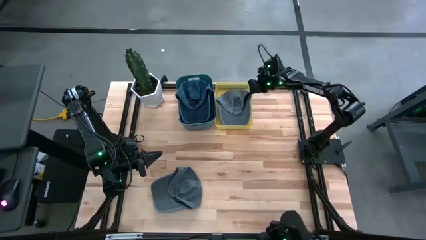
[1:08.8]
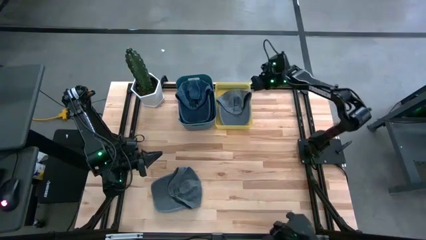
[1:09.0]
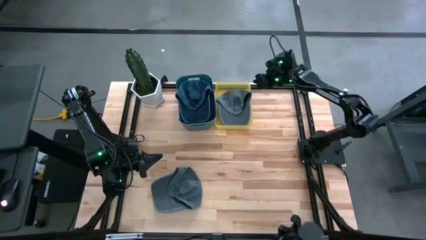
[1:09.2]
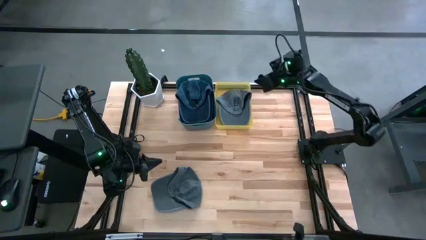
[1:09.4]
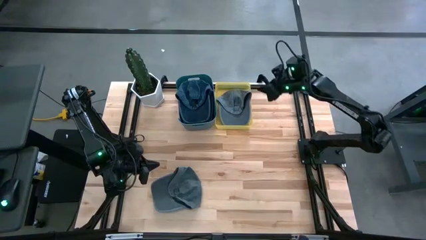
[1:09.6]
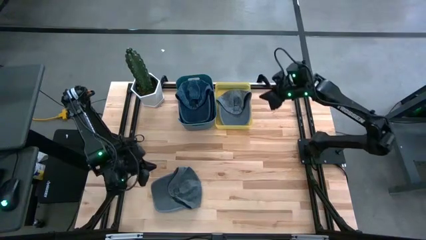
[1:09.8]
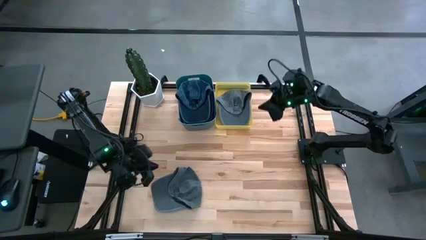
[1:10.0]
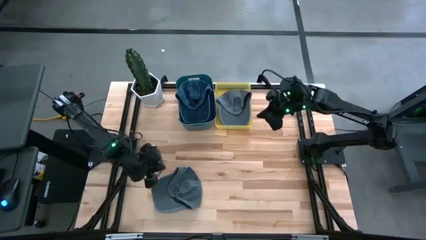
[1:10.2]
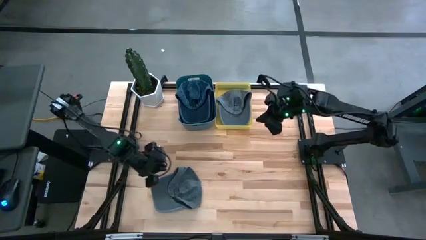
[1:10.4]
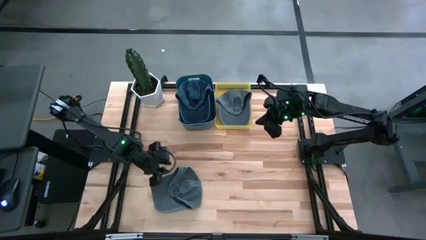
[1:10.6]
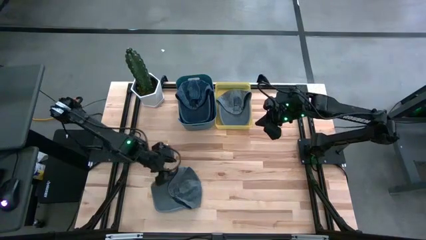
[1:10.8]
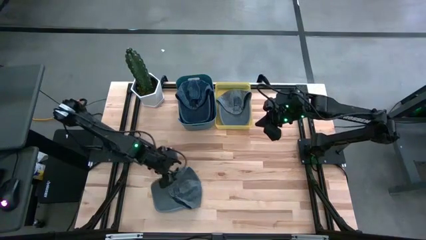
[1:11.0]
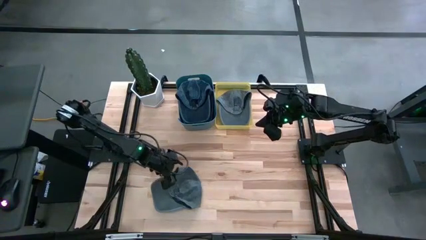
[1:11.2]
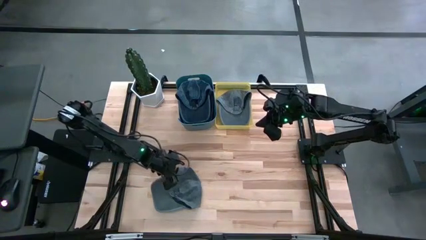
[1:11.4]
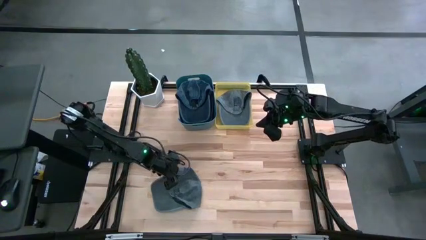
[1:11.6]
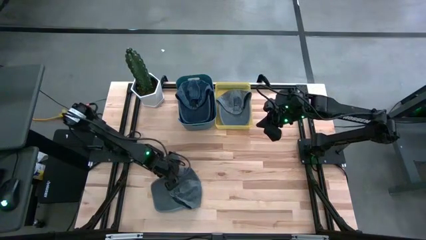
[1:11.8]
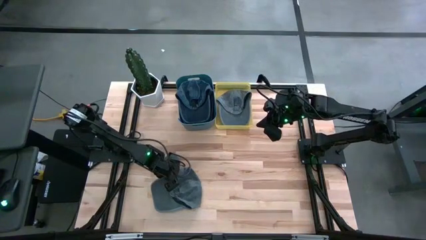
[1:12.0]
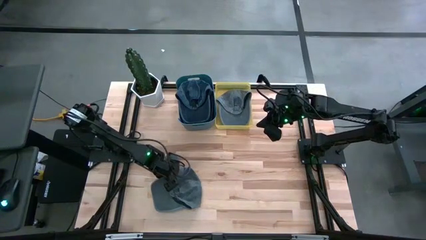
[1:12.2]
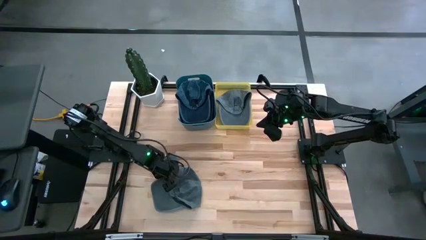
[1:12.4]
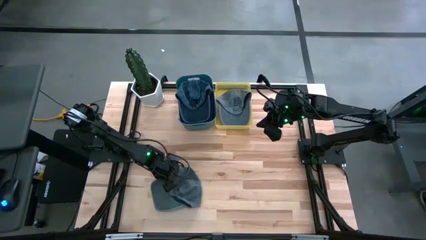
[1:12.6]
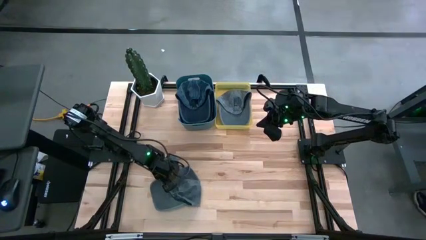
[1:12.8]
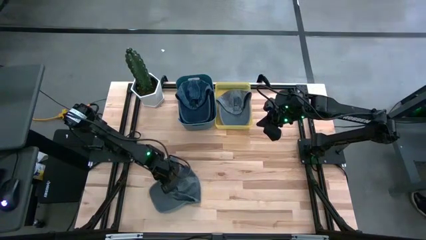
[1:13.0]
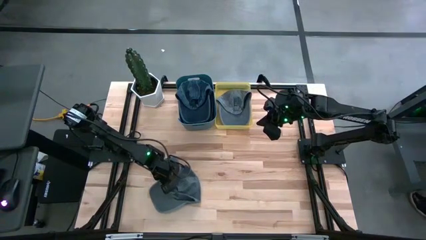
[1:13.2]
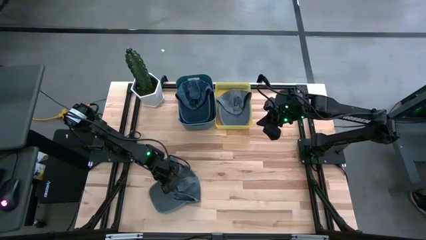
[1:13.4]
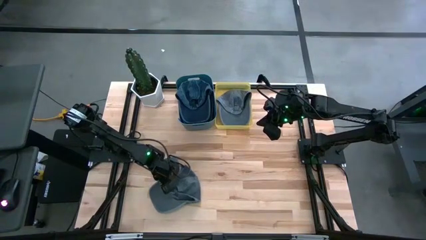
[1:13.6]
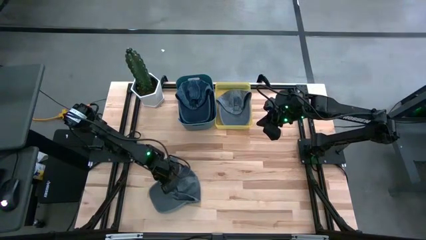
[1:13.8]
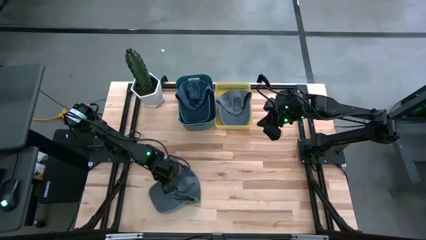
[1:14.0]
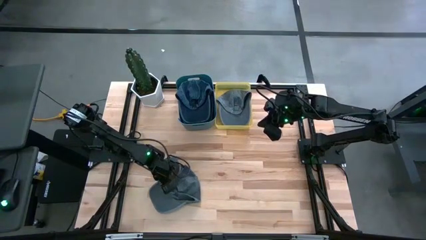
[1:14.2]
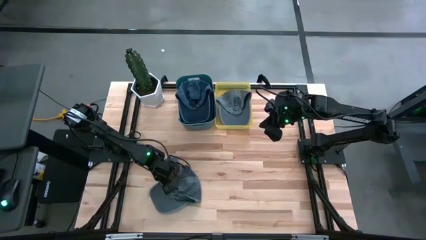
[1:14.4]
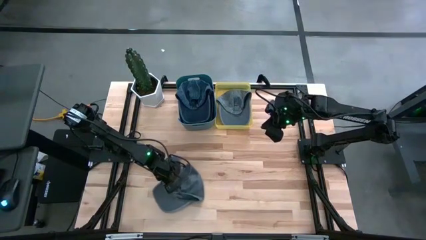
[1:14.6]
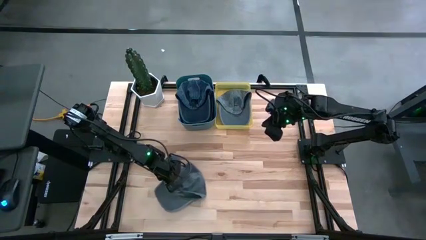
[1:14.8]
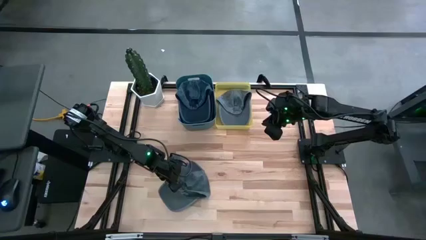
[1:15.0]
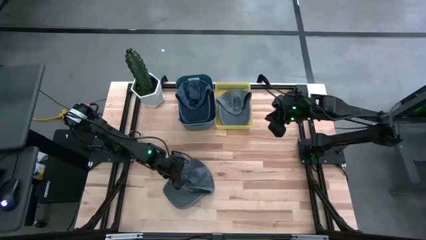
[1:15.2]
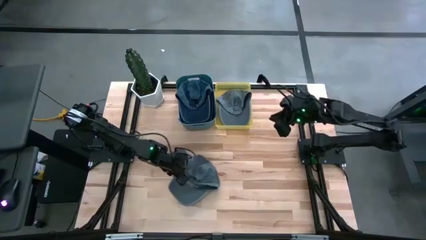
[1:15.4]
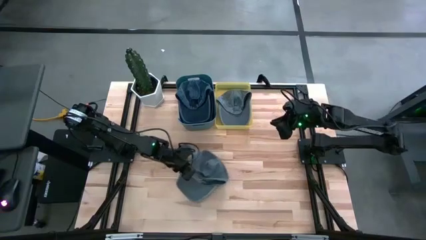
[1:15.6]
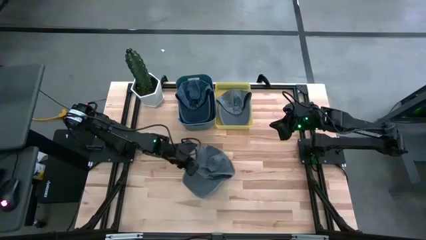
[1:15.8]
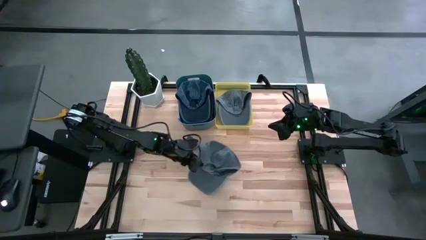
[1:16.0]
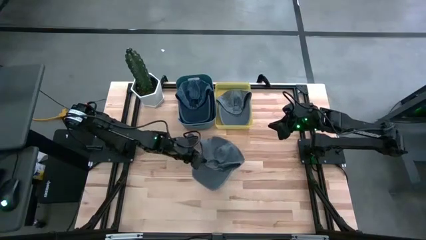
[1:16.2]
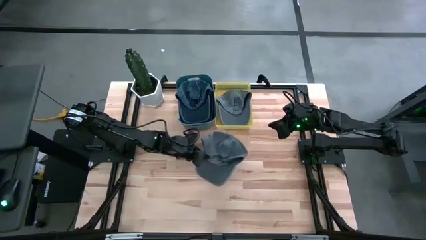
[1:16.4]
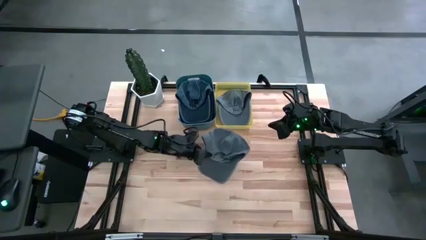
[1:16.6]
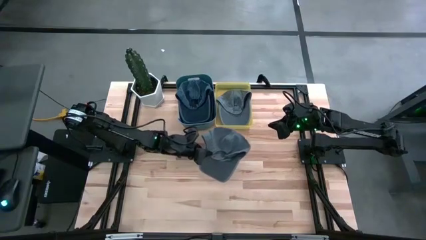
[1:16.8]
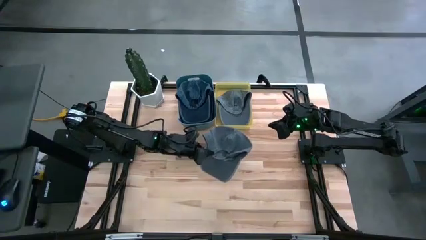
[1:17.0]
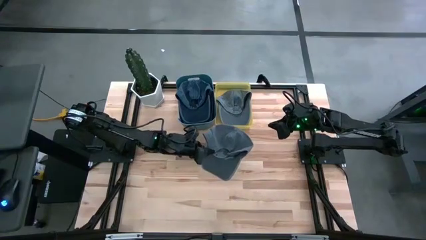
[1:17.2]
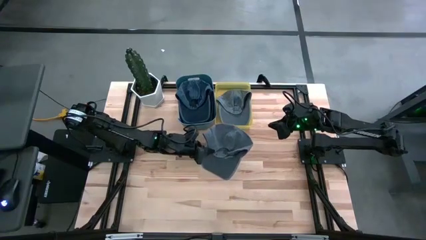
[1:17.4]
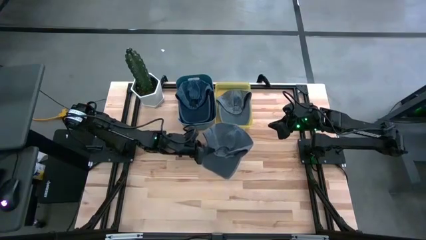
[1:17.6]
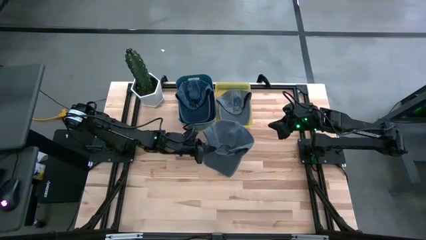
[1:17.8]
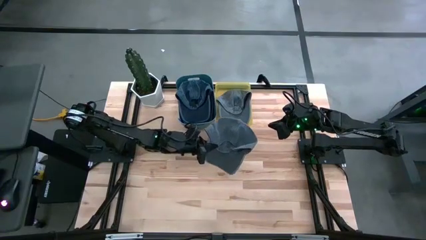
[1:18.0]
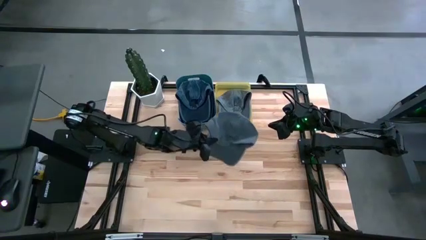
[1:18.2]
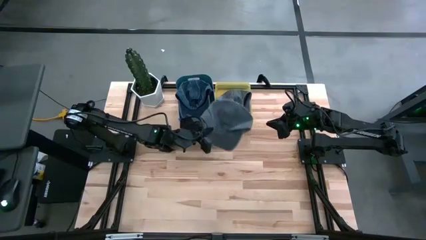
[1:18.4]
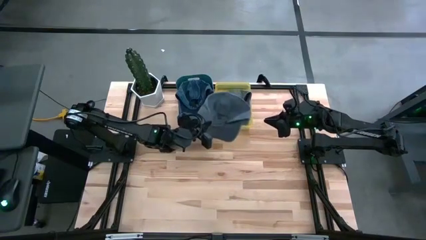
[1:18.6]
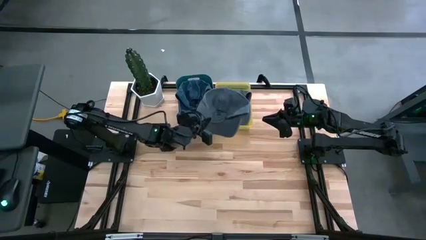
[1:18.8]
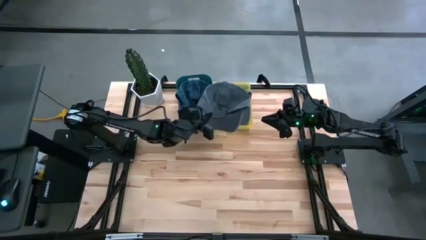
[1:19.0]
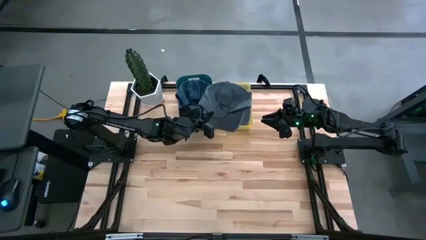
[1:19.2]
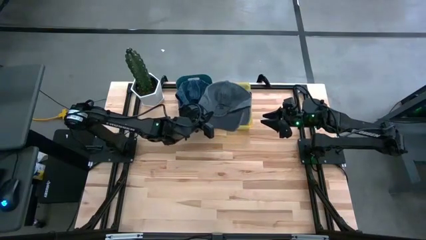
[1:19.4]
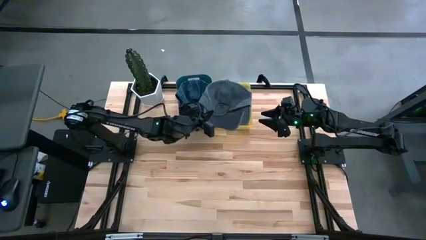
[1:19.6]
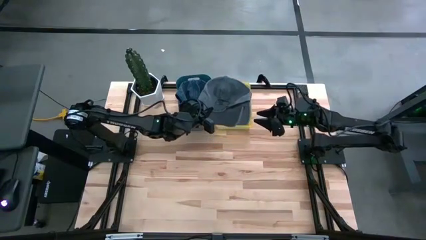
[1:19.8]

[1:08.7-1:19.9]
Task: Pick & Place hat
Put the gray cap into the yellow bin

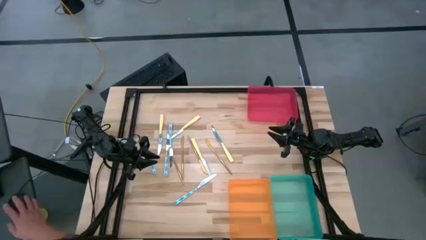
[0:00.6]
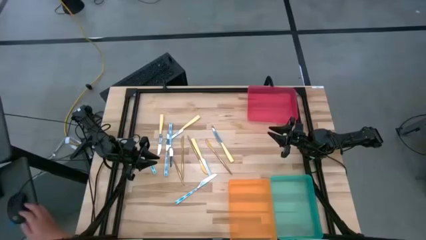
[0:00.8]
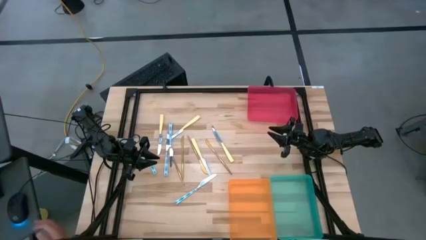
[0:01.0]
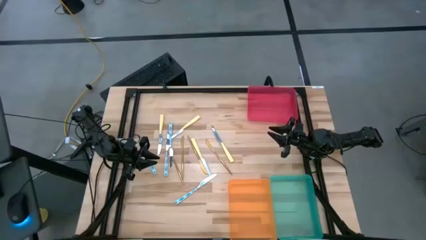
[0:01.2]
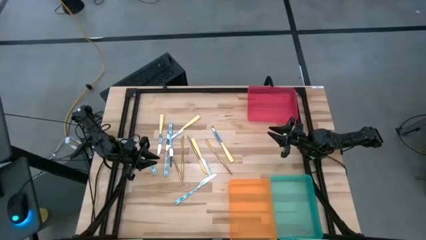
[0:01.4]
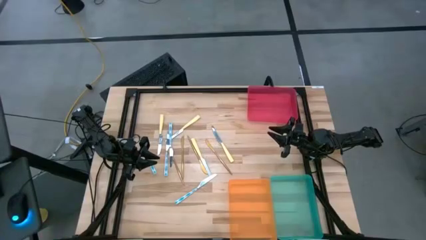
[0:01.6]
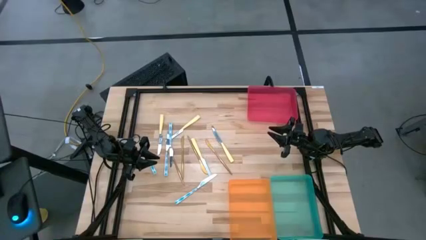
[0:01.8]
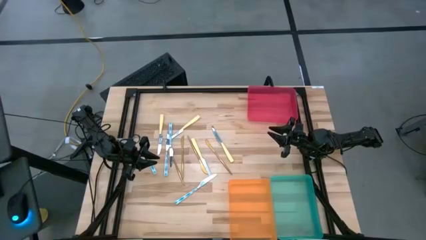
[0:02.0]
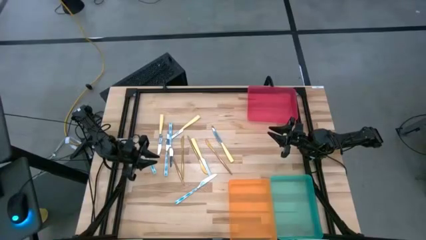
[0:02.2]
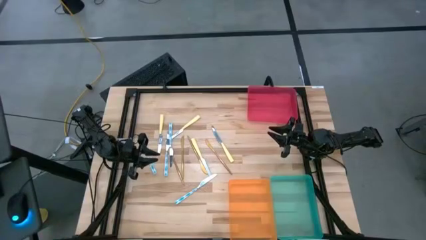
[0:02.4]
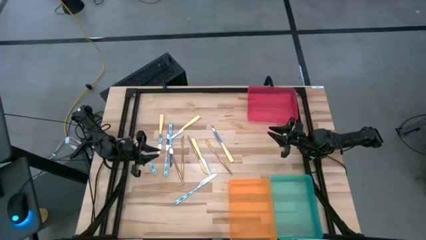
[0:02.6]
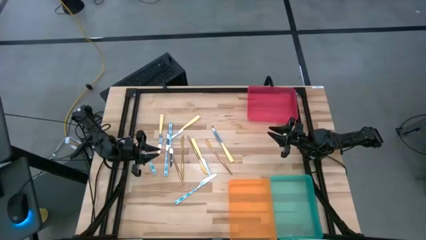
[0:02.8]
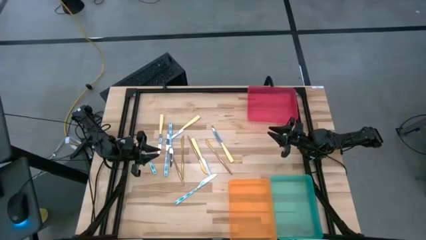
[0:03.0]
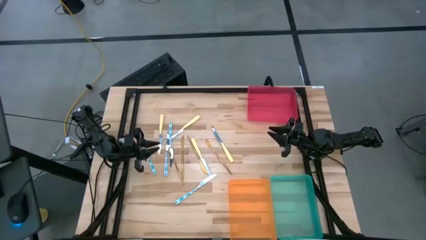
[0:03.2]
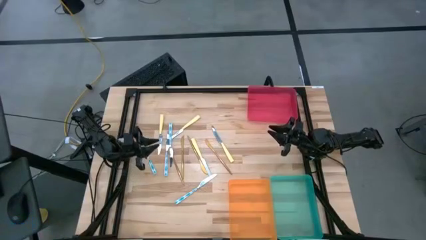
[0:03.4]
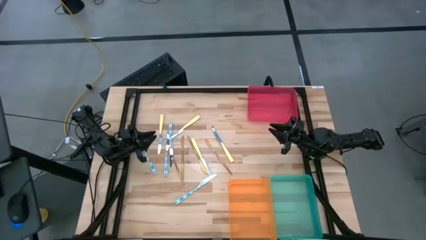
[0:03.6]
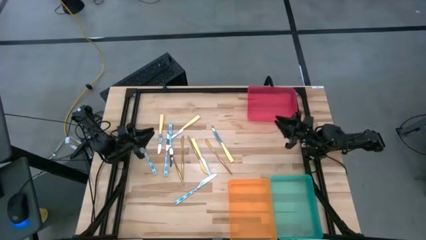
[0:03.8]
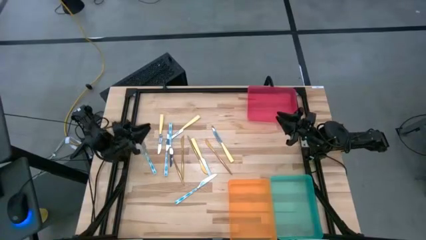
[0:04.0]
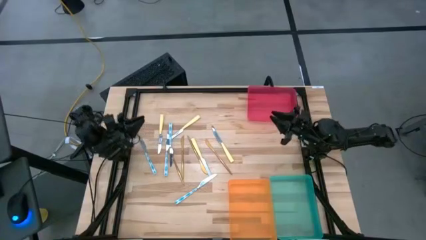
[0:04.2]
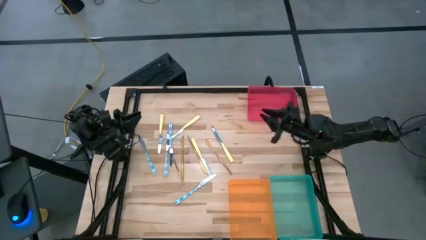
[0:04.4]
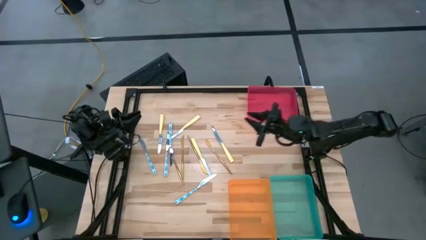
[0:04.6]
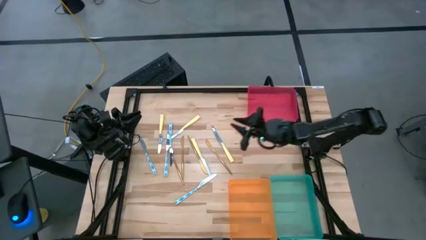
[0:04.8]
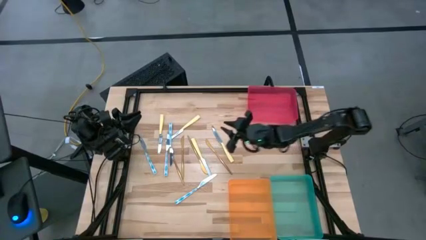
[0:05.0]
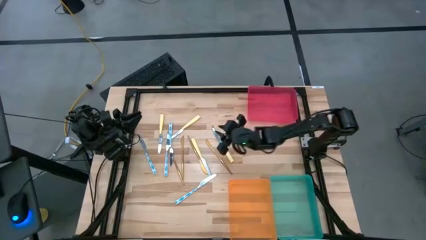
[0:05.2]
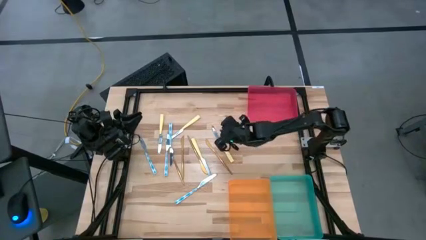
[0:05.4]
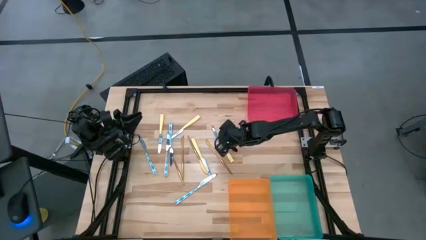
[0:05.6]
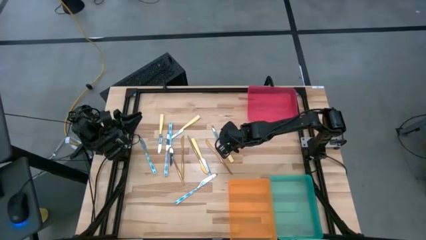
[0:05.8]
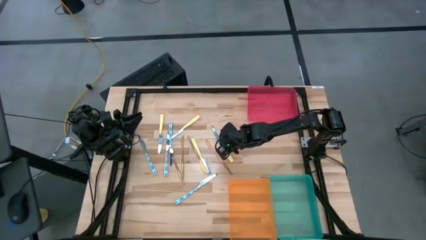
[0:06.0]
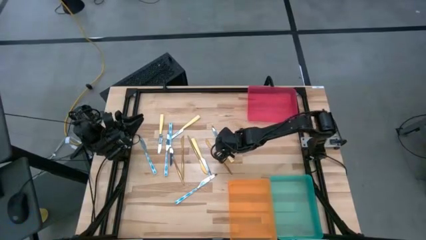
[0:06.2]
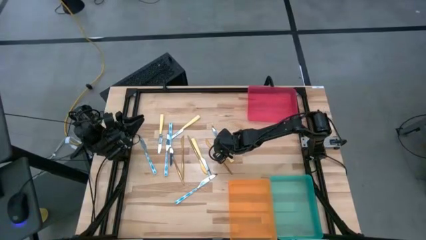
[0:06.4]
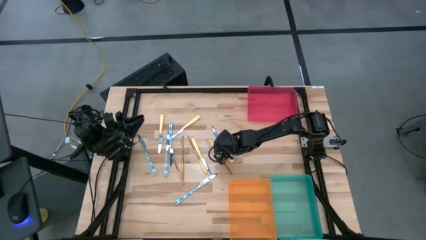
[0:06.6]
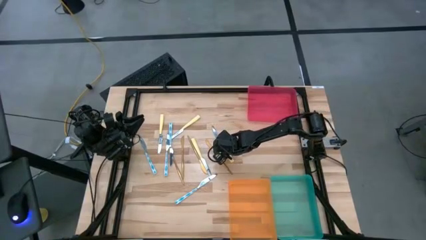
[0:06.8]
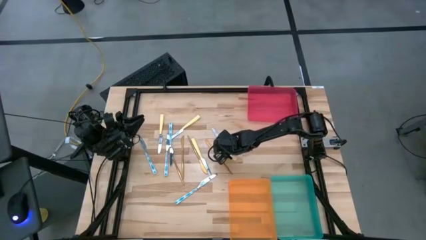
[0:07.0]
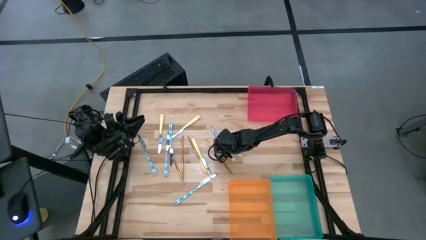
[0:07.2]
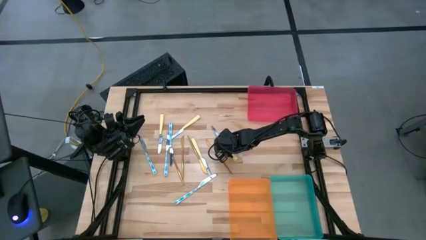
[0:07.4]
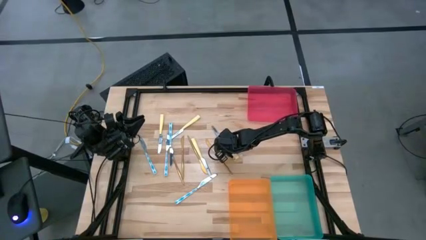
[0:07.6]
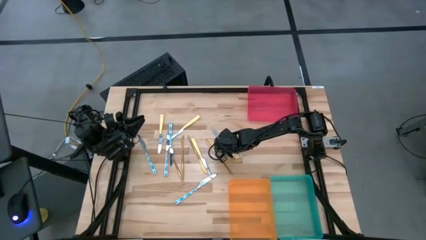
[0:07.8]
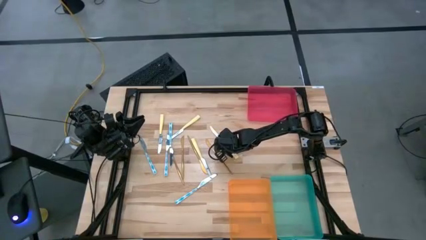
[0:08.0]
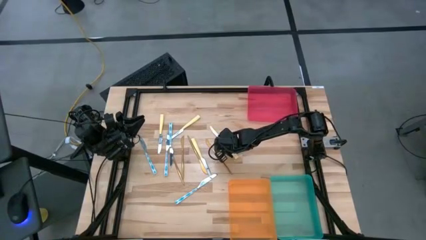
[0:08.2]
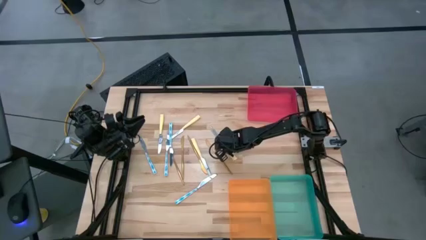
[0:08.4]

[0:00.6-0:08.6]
Task: Sort silverware by color (type)
Put the yellow knife into the orange bin
